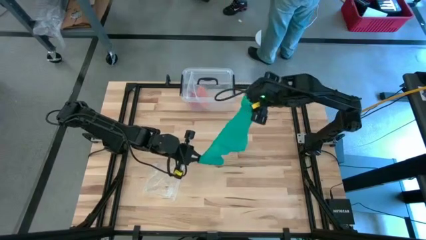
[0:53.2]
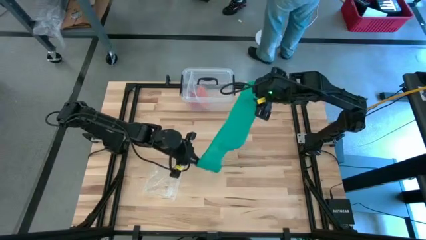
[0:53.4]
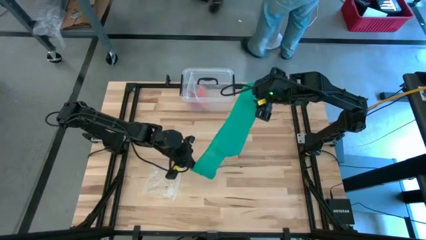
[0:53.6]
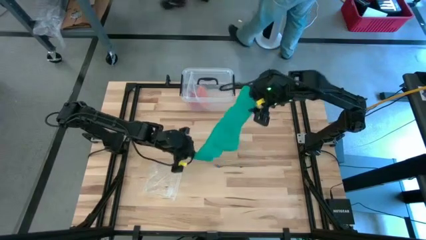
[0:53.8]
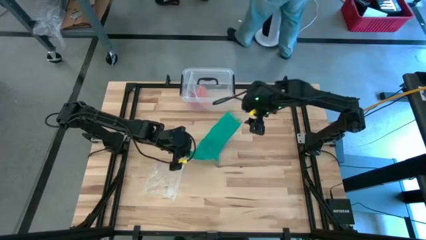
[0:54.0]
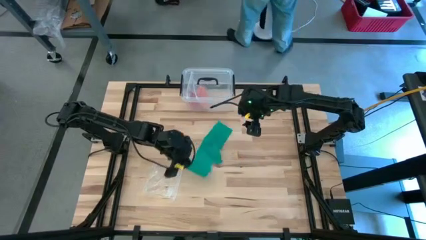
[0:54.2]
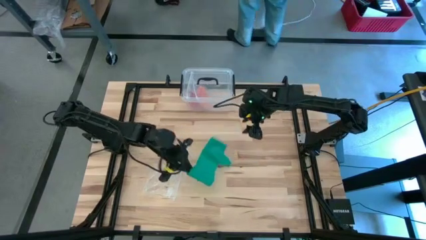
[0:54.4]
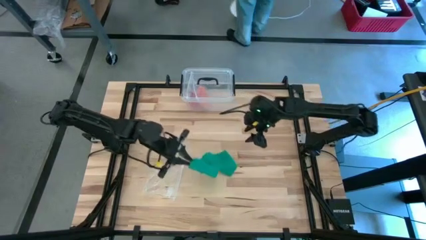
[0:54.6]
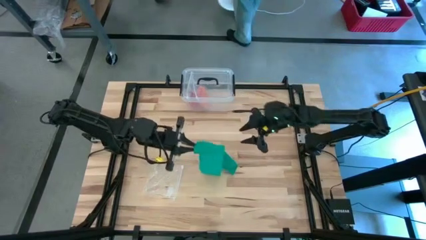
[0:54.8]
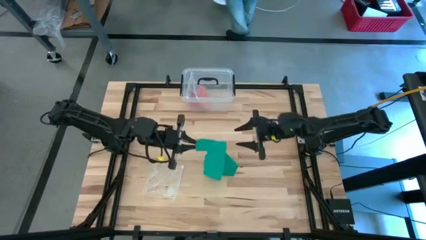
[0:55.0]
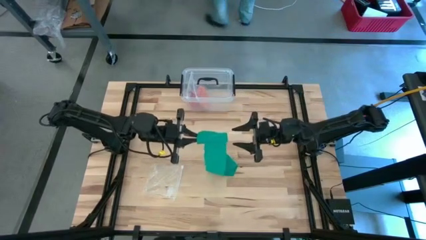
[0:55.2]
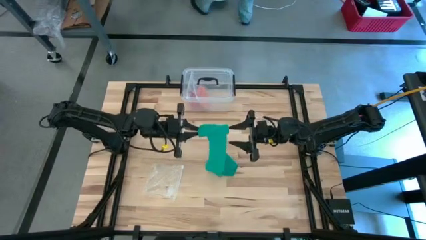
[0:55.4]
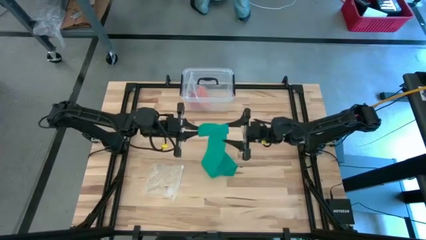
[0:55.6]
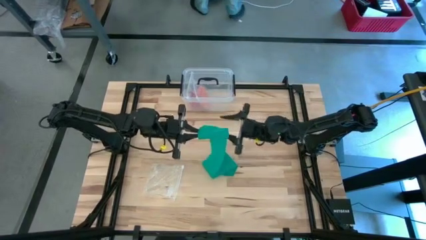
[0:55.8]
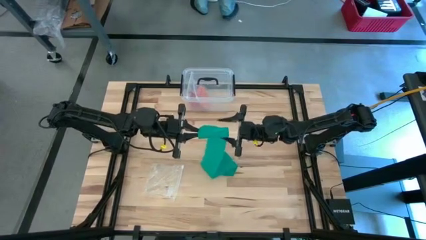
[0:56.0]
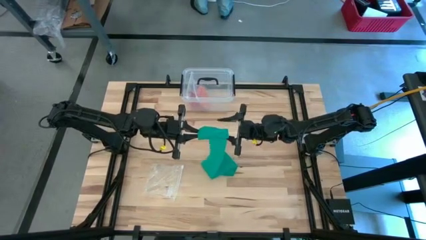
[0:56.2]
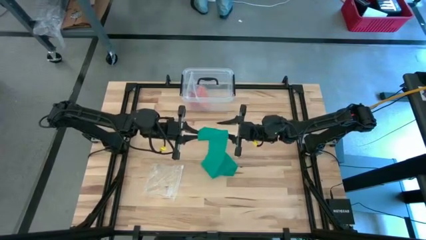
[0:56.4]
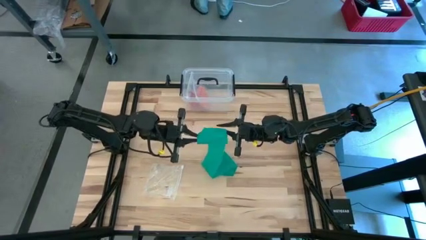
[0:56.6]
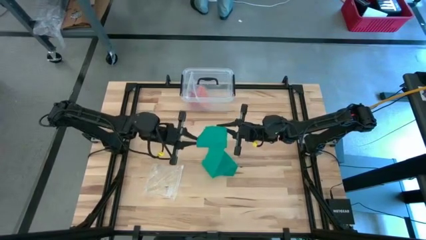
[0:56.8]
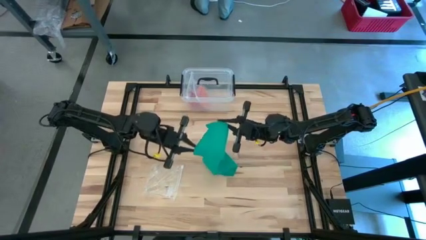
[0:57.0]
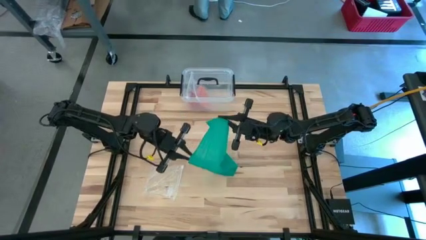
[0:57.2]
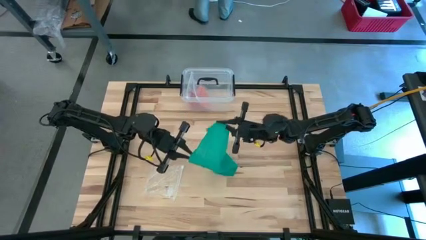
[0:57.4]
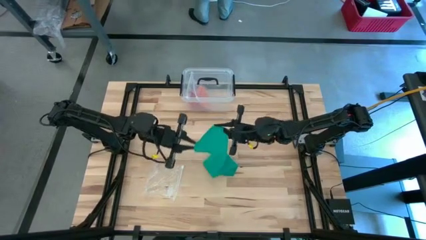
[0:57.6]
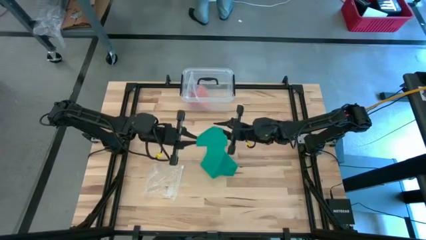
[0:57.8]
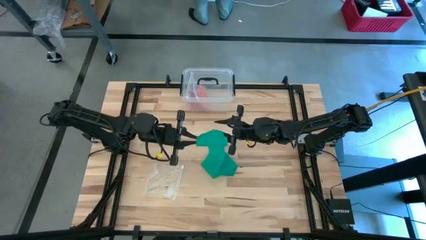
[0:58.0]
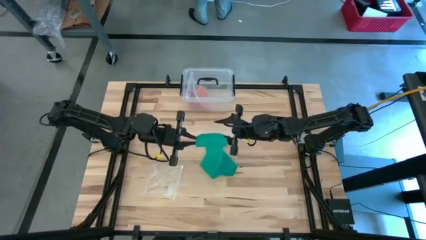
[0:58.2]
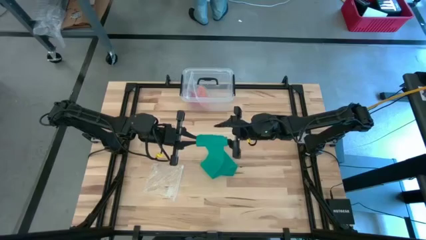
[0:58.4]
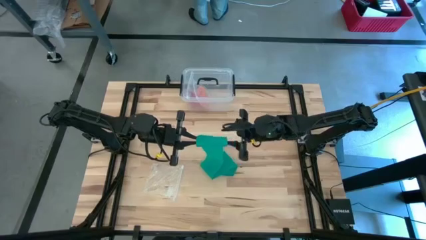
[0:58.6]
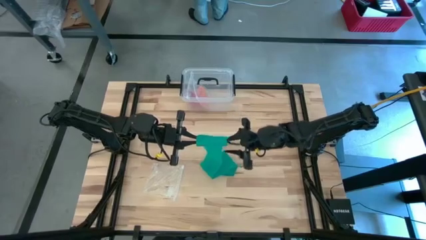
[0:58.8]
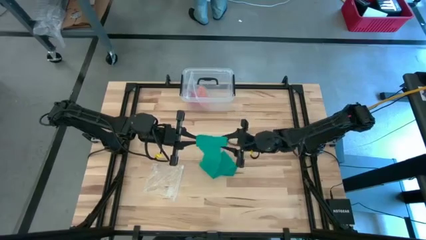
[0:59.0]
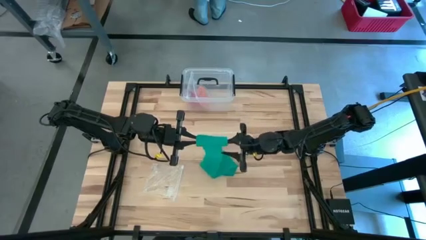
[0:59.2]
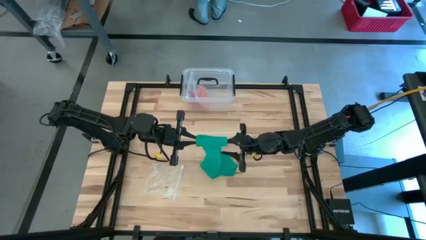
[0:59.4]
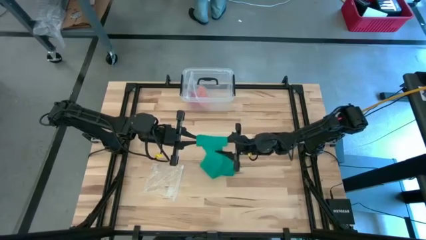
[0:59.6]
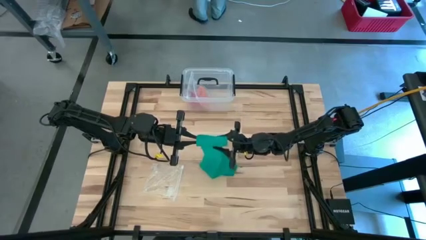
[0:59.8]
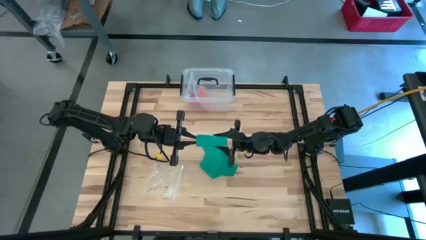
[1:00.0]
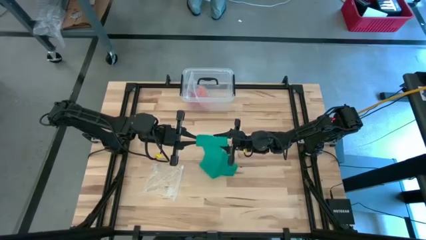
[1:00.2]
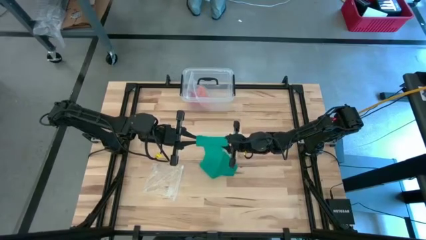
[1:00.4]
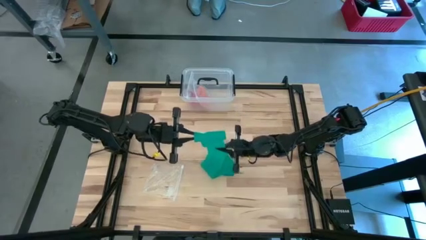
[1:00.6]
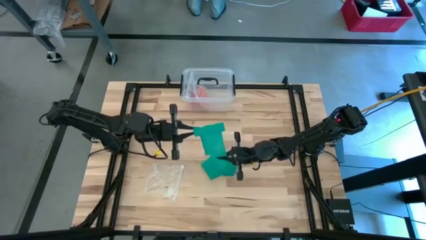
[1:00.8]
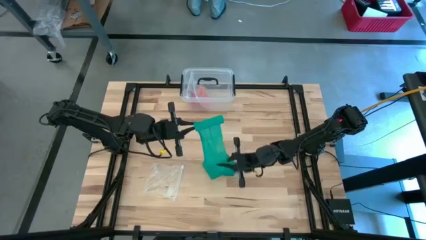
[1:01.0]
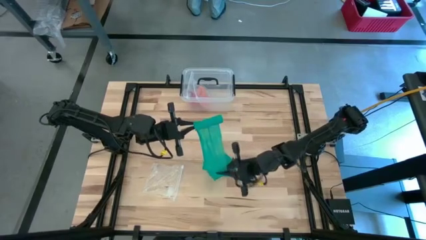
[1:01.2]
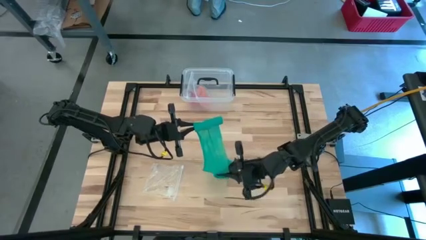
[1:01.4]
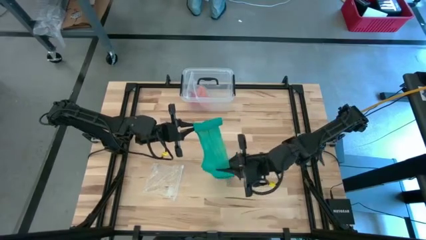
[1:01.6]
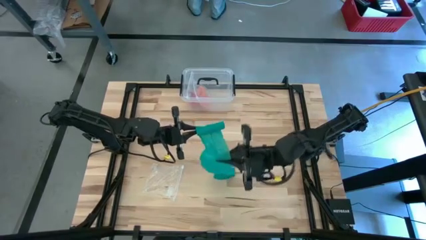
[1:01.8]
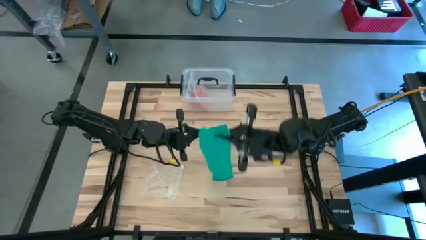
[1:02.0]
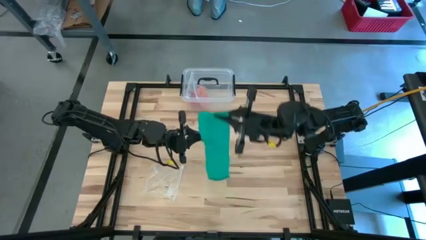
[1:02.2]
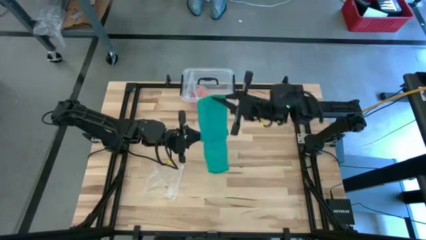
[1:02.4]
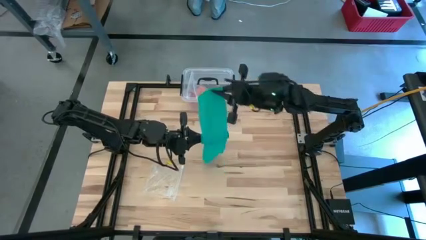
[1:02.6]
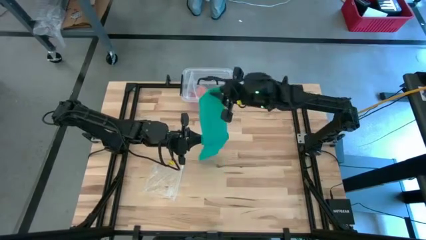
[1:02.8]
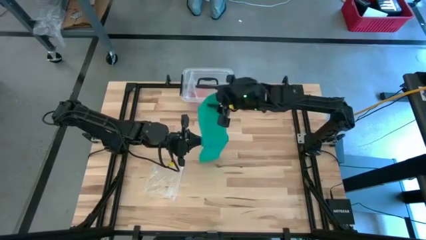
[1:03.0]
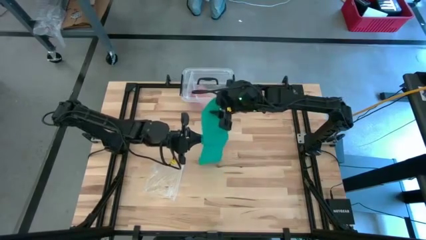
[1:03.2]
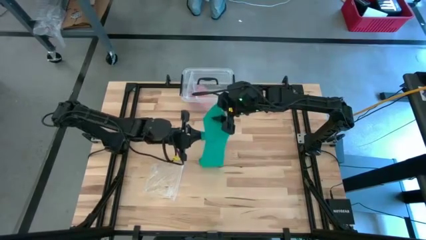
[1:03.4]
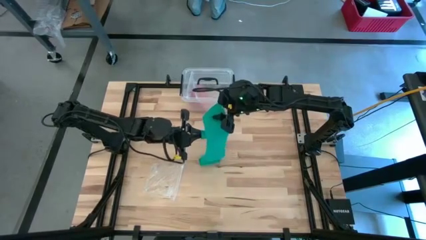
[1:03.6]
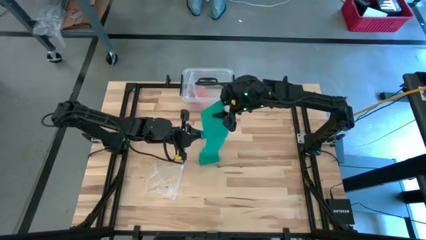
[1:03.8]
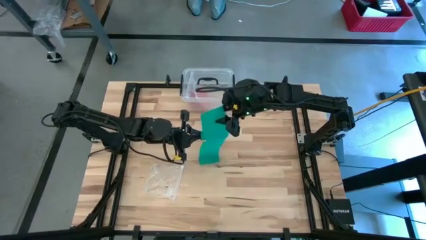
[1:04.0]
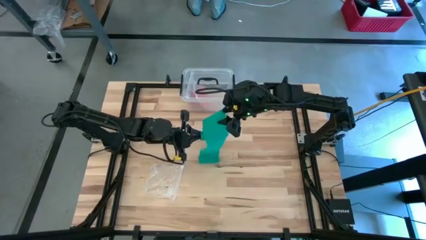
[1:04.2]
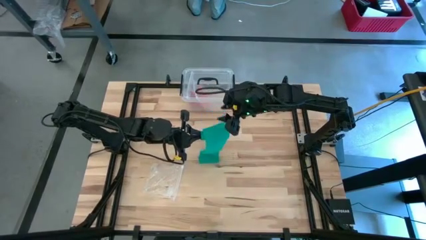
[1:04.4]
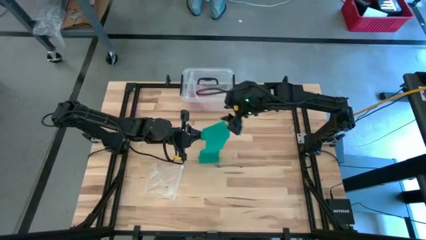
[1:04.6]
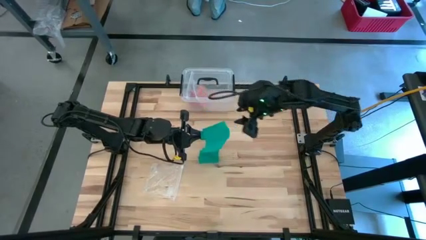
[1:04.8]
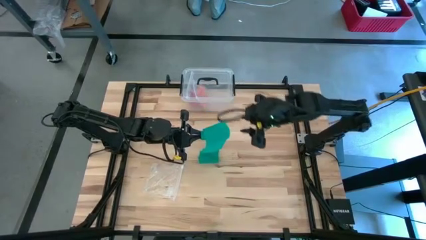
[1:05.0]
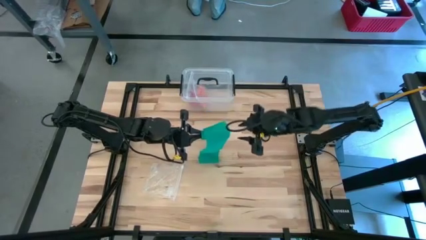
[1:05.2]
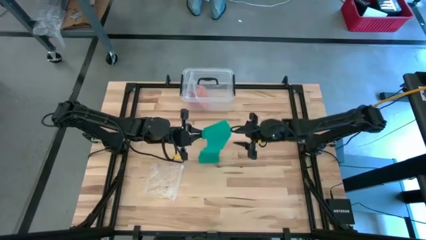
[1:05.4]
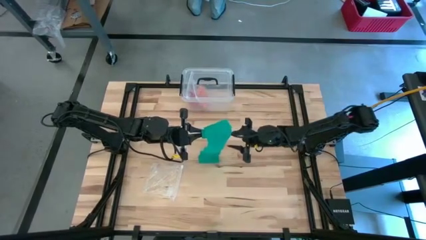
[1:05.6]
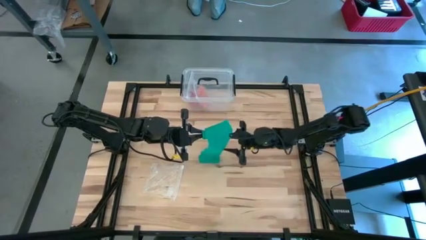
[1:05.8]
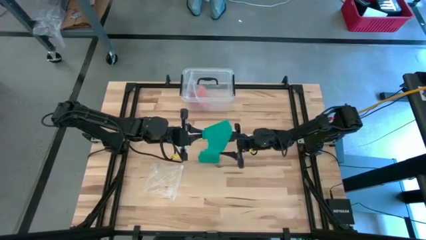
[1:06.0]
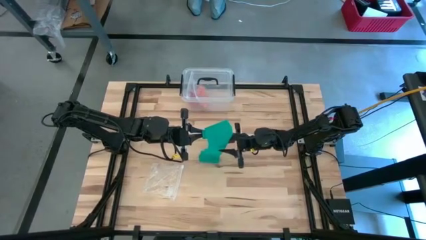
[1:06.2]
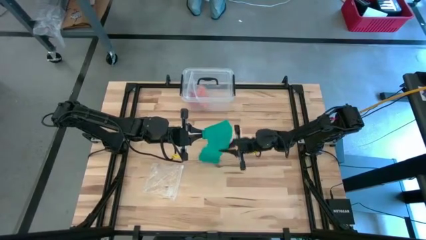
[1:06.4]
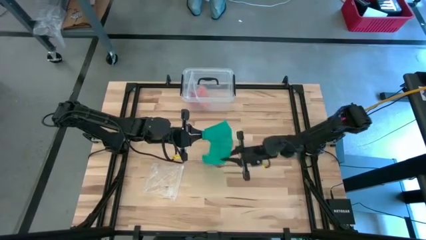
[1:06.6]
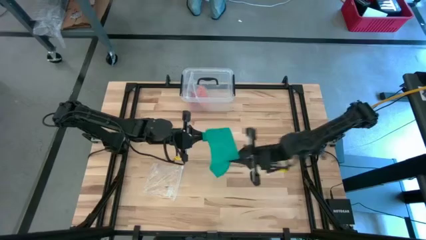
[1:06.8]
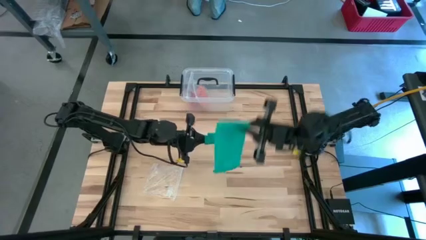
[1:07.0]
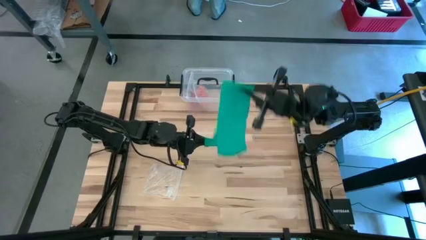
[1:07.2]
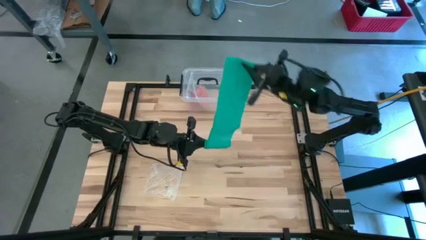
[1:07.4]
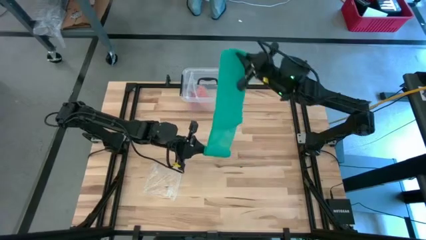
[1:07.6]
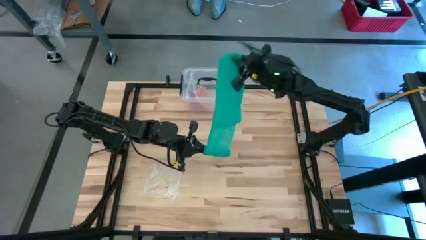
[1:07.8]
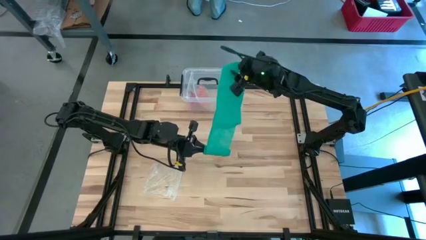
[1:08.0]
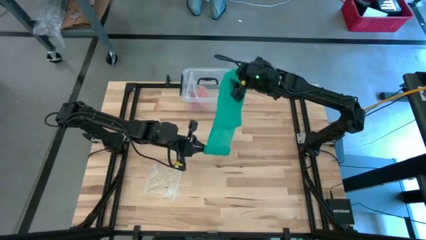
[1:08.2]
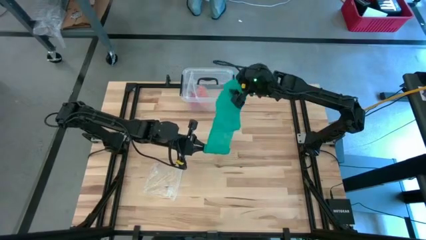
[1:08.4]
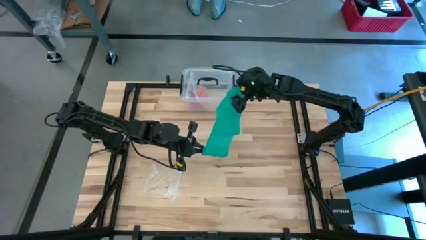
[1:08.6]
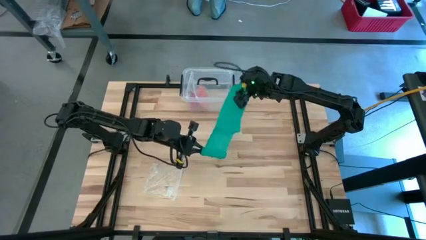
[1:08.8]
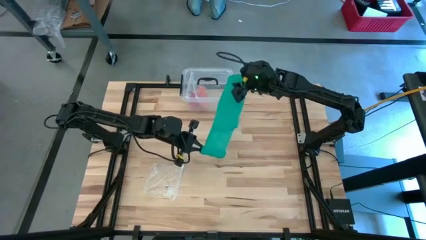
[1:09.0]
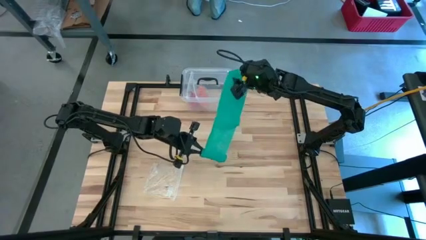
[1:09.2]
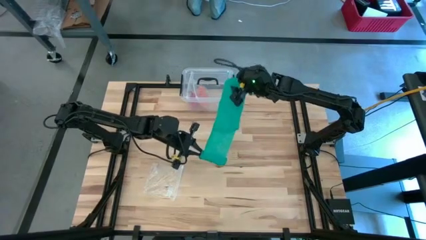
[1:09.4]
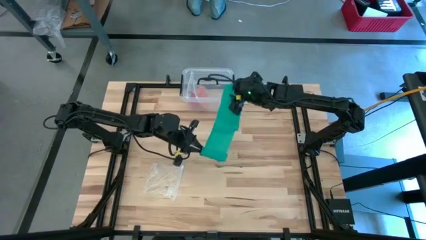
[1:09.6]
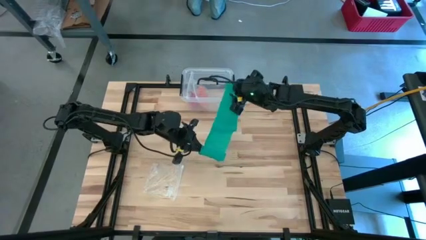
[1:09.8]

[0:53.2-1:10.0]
Task: Roll bandage
Roll the green bandage
